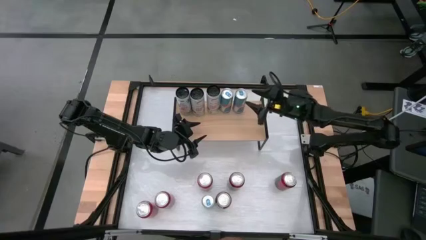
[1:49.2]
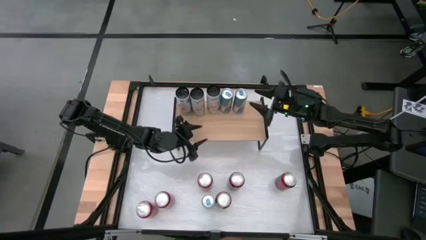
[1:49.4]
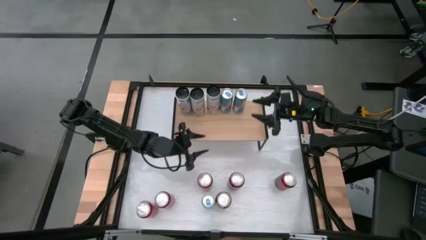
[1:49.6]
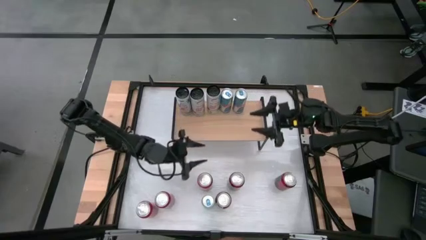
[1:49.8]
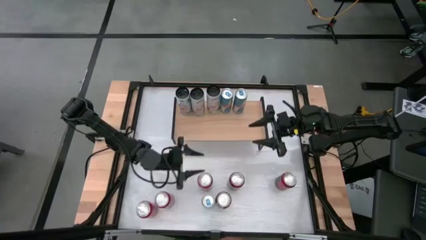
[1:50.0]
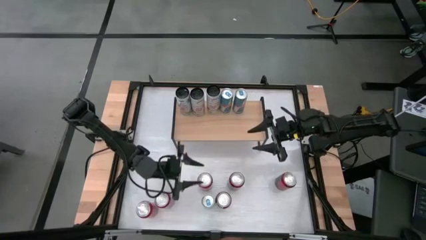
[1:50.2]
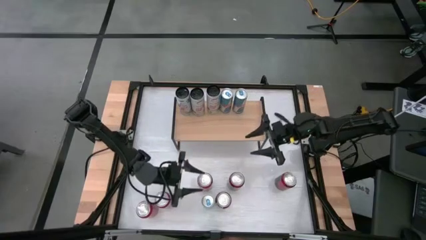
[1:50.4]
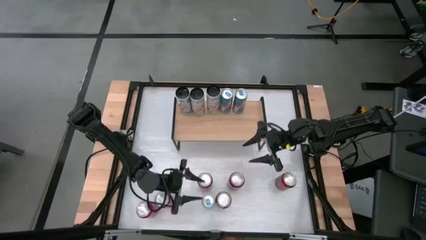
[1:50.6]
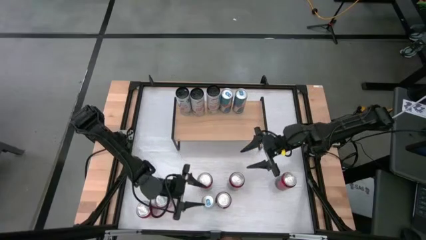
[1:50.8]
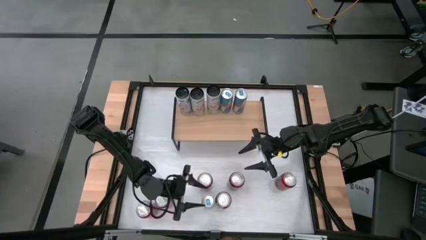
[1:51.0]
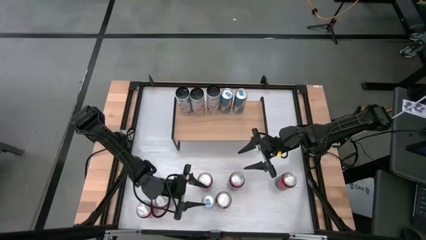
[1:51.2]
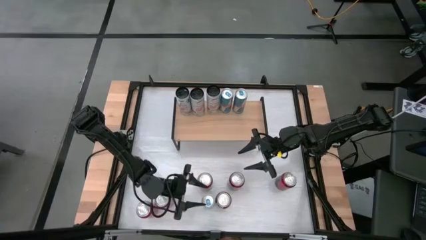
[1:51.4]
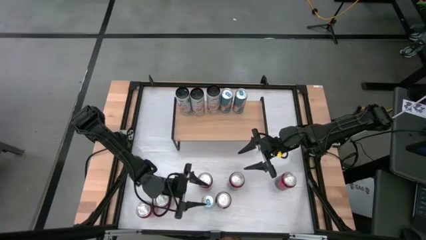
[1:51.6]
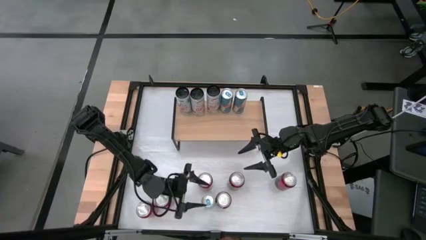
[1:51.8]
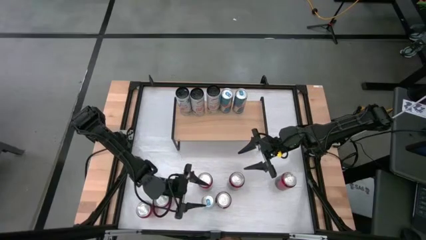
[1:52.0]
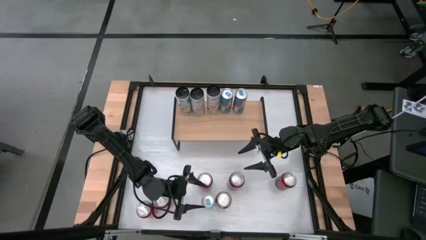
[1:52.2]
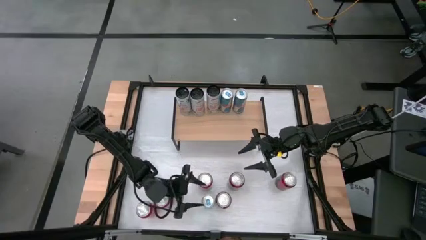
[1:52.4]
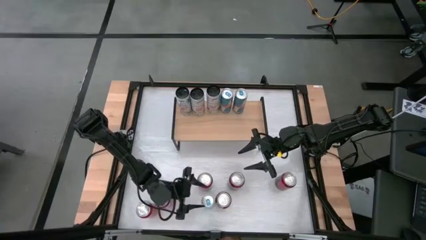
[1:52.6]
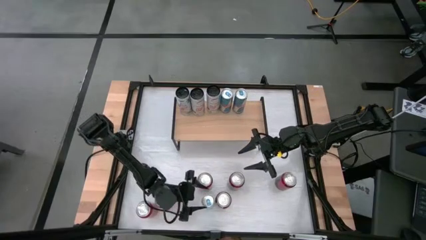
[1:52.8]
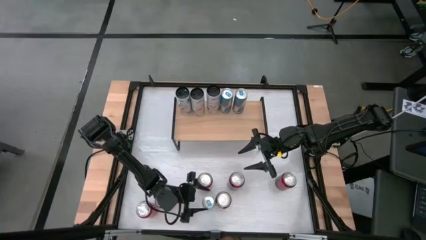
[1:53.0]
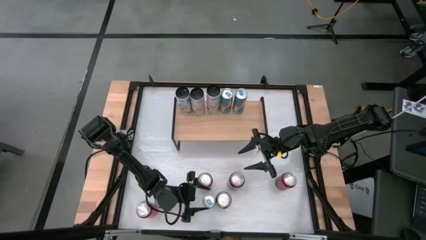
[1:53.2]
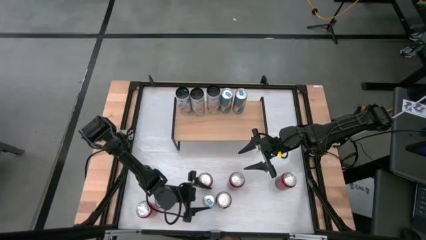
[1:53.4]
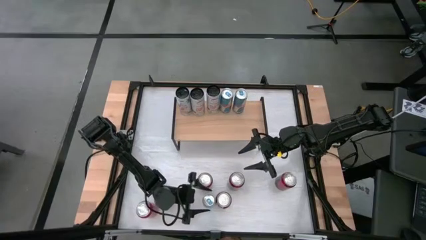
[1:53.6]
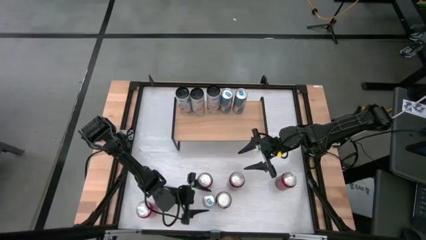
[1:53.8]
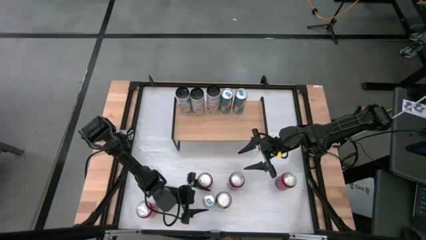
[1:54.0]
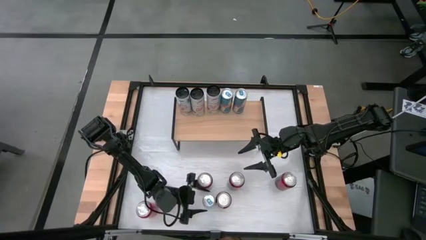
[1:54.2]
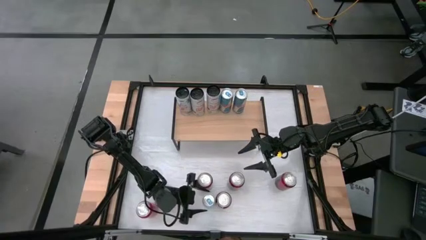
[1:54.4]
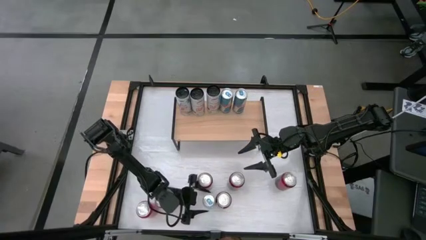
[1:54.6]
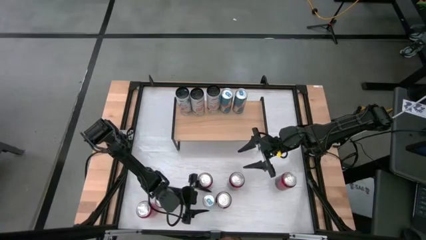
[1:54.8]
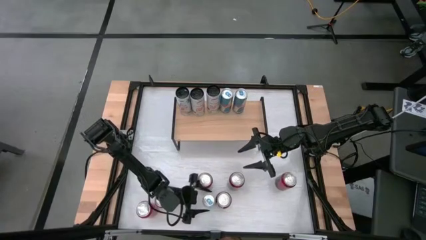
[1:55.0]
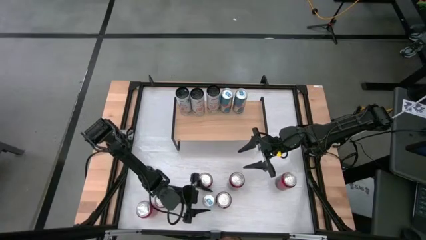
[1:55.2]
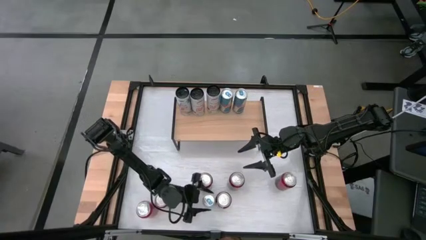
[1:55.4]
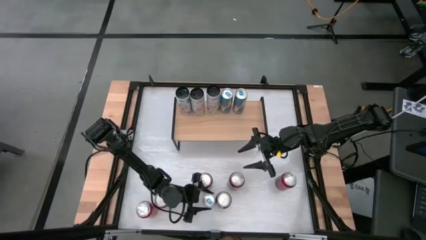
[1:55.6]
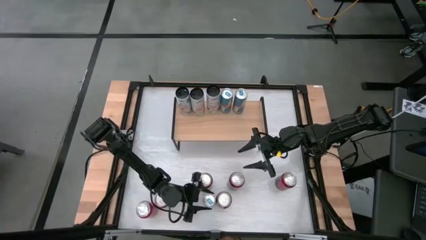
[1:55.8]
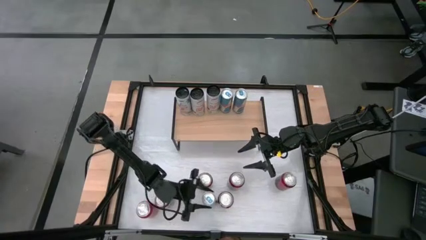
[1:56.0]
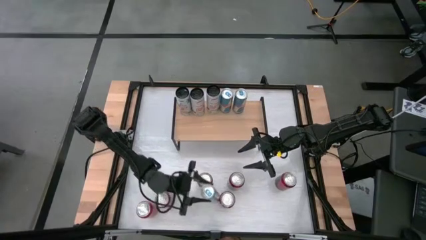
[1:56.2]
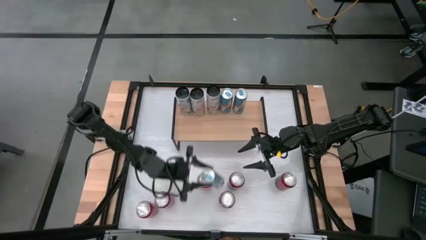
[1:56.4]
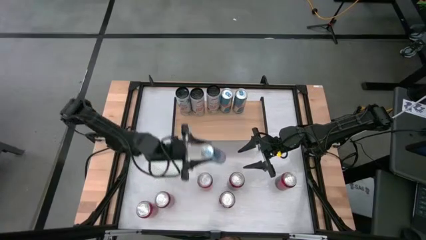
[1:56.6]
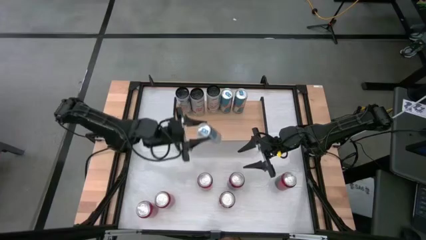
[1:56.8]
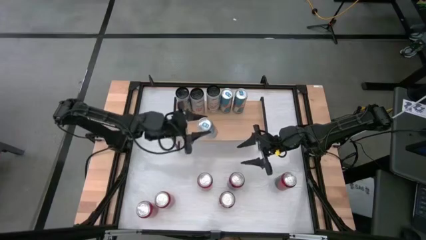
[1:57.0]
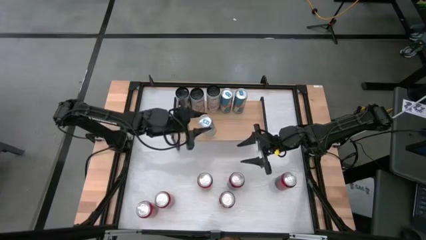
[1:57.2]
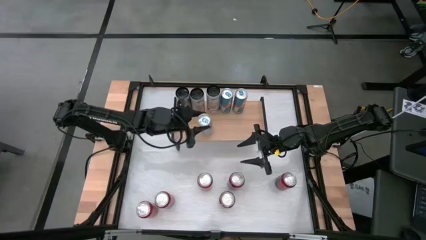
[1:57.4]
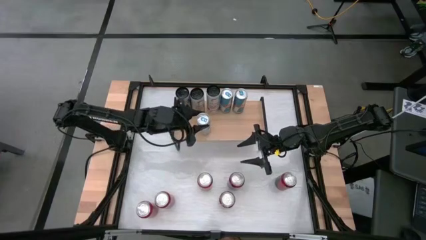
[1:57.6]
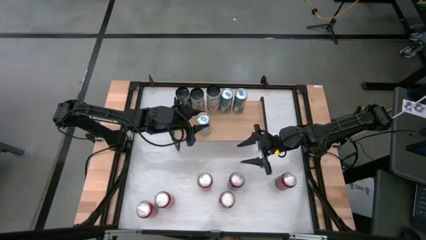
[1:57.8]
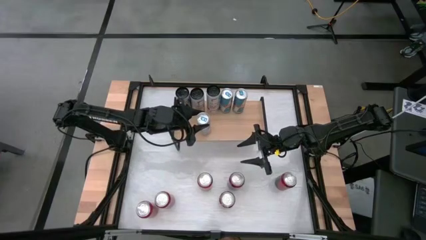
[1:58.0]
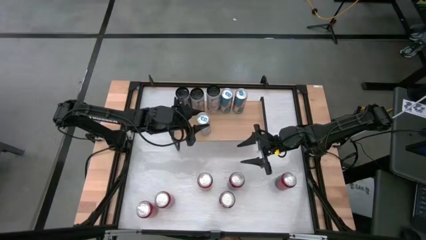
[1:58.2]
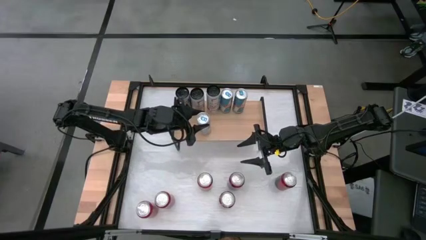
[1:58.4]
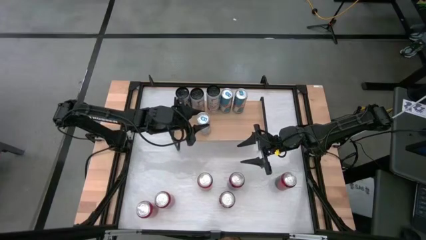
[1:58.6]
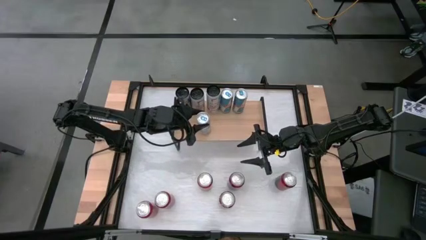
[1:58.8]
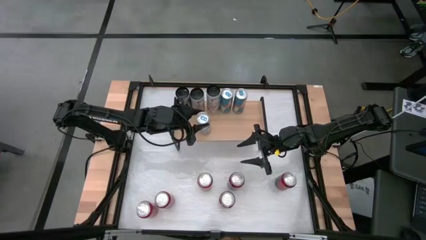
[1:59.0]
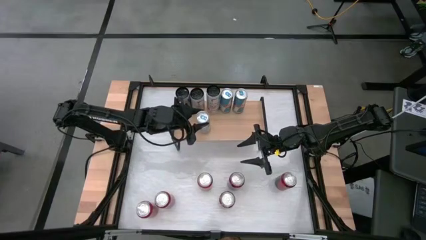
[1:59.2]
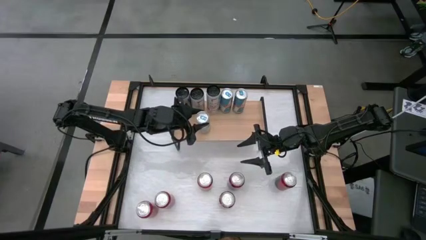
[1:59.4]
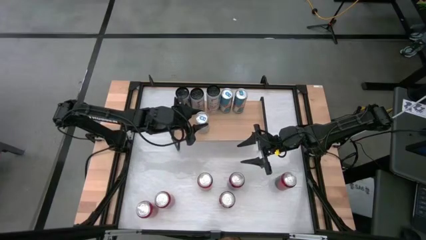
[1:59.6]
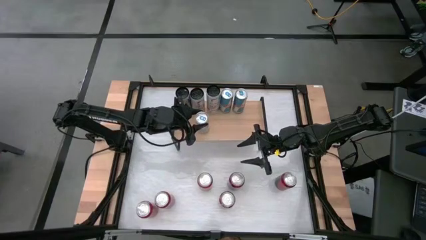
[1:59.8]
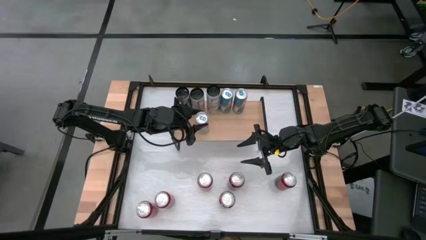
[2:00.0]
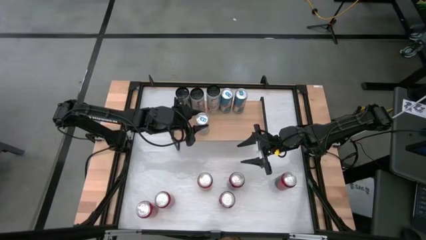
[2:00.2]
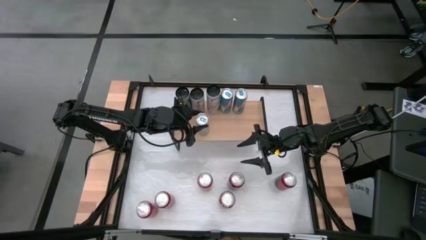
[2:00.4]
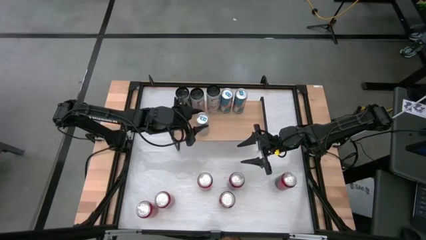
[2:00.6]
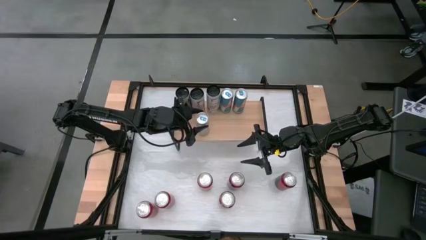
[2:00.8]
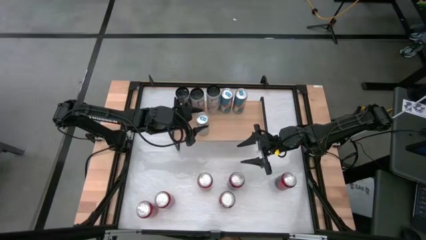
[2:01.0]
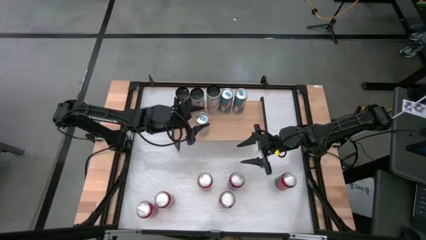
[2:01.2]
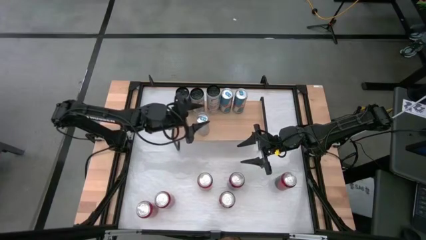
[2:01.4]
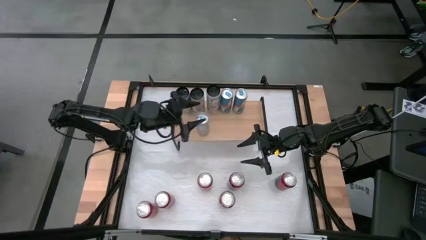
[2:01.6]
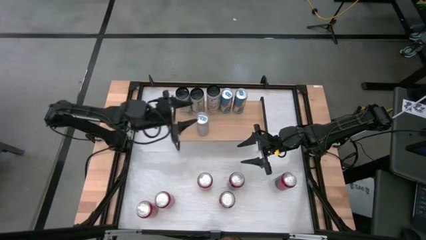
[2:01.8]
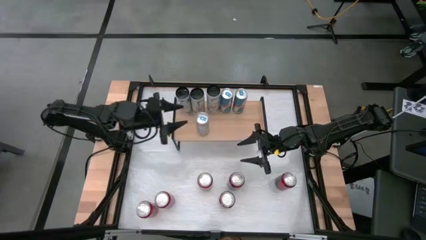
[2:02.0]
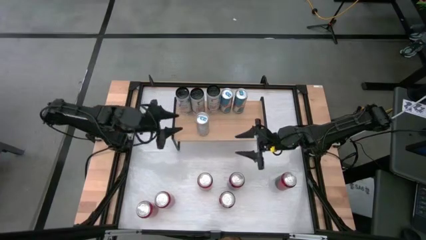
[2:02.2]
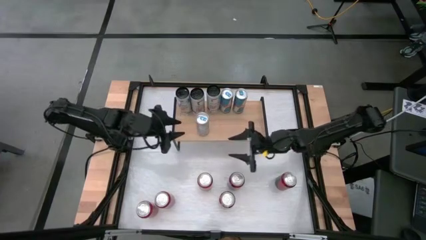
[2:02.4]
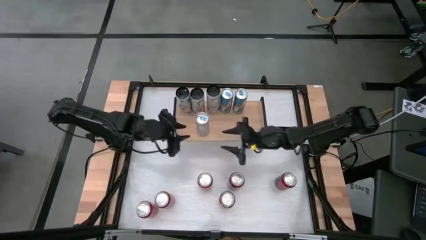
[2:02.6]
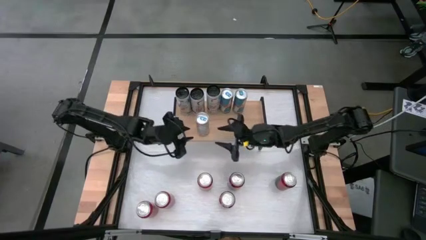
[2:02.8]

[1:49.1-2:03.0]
Task: Place canned beverage on shelf
Put the blue soda can on the shelf

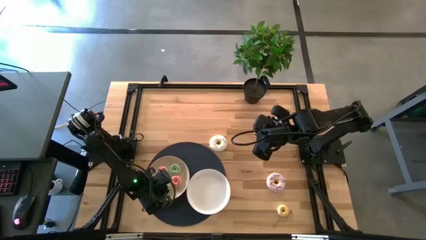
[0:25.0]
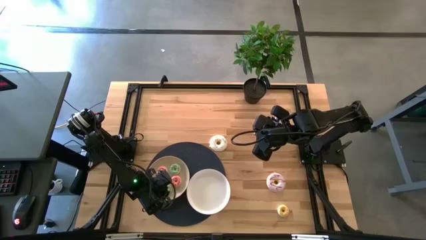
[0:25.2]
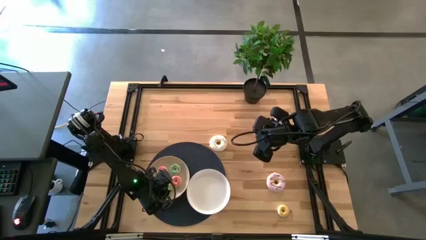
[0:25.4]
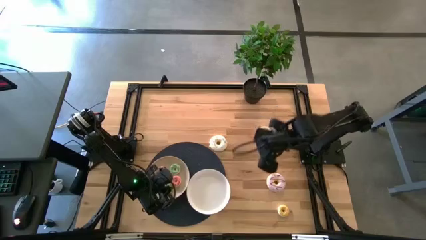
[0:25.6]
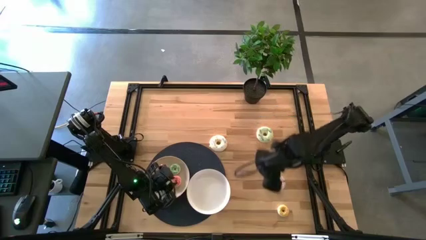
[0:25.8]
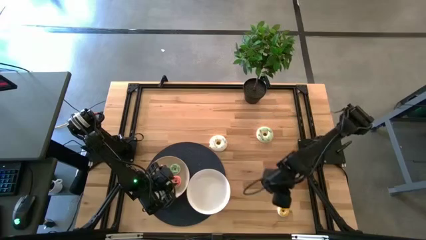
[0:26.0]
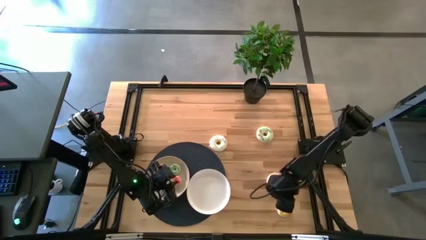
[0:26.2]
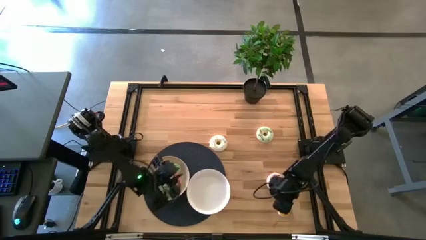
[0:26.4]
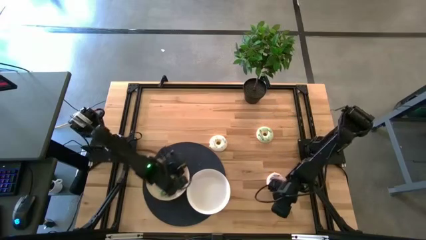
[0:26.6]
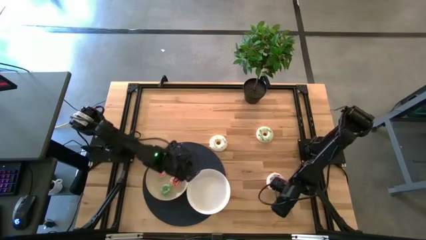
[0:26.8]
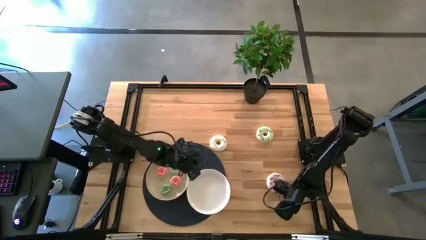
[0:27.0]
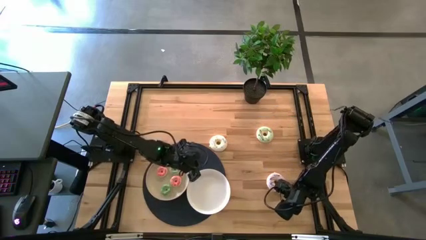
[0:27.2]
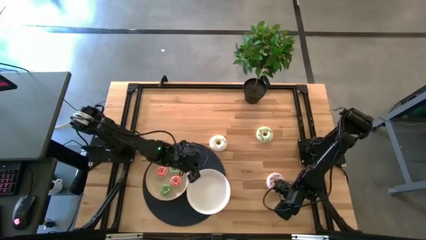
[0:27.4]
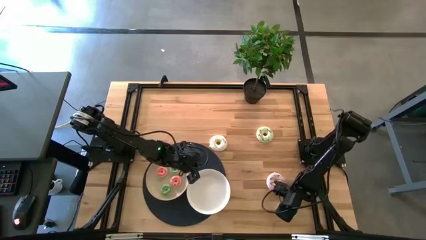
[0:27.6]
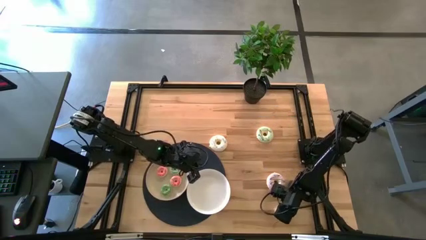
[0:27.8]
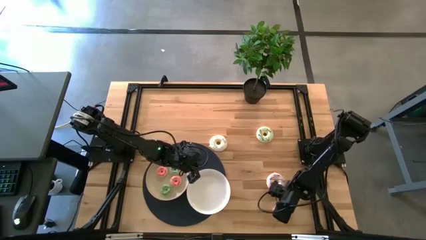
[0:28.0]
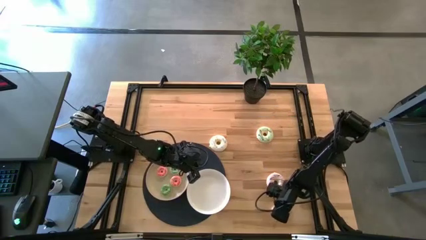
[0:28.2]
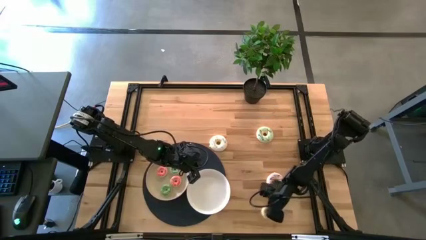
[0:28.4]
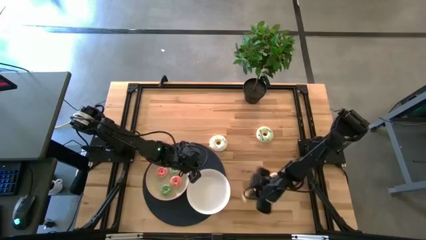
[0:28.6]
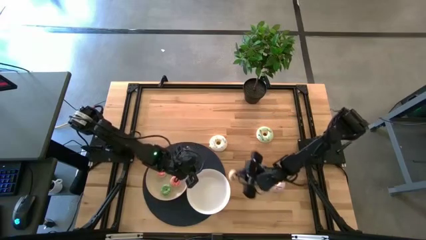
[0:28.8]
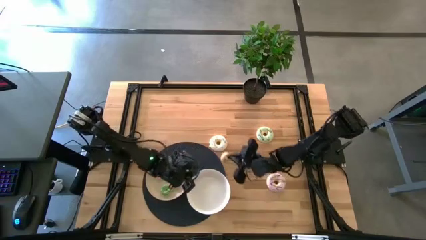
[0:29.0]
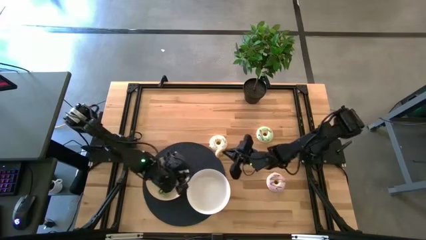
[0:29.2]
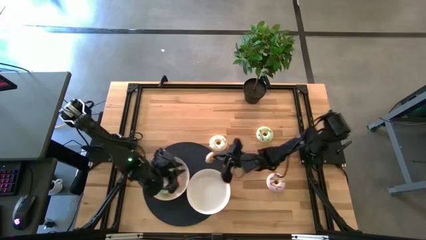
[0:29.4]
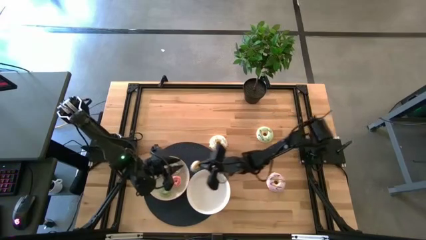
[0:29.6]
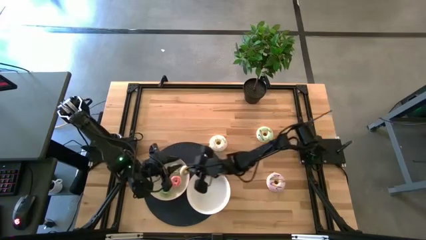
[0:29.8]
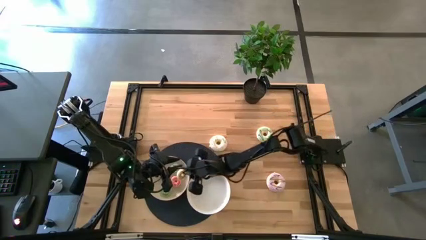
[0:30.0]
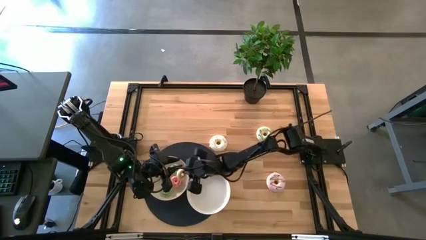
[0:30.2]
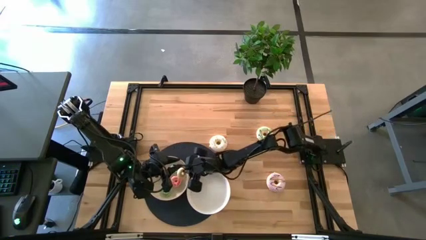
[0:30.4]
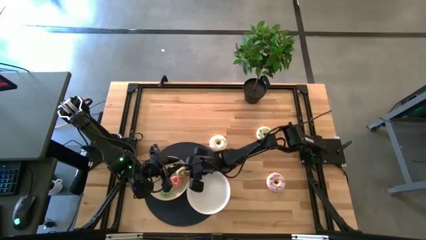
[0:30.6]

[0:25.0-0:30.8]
Task: Pick & Place donuts
Put the small yellow donut on the left white plate
